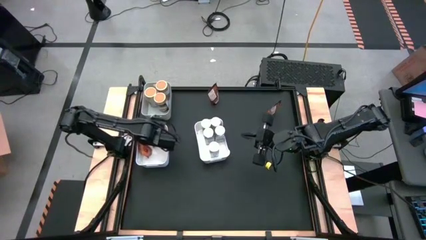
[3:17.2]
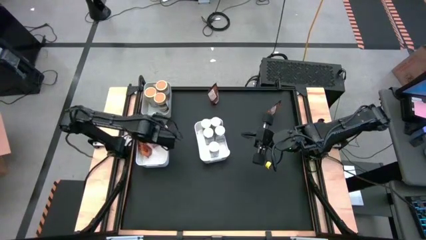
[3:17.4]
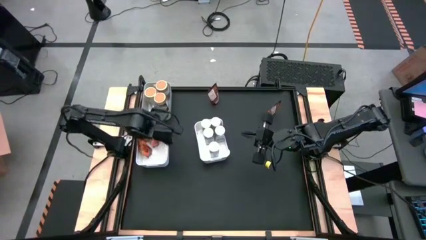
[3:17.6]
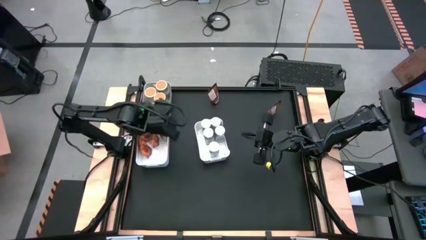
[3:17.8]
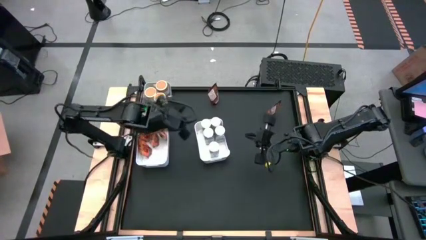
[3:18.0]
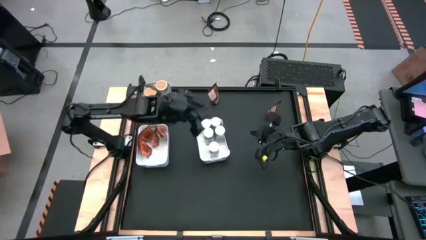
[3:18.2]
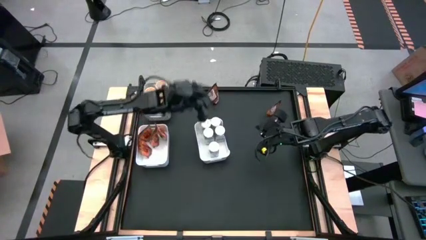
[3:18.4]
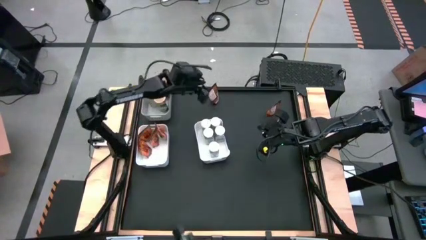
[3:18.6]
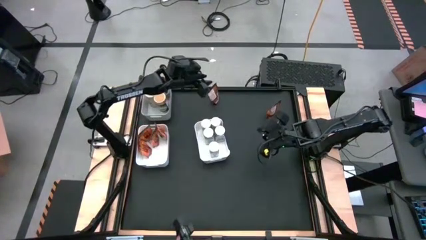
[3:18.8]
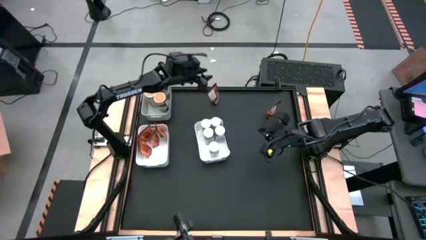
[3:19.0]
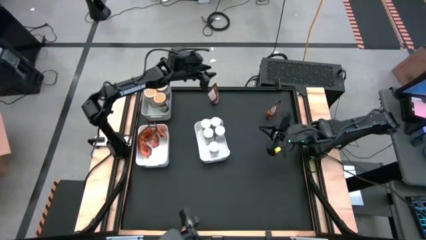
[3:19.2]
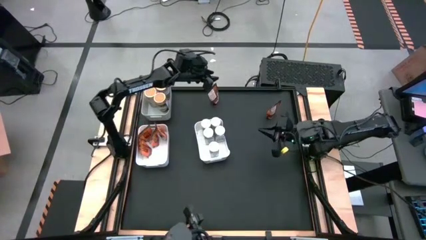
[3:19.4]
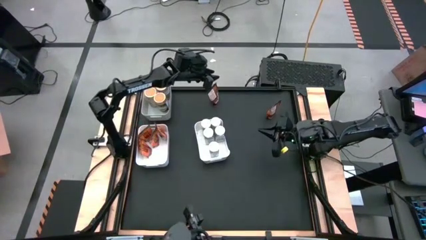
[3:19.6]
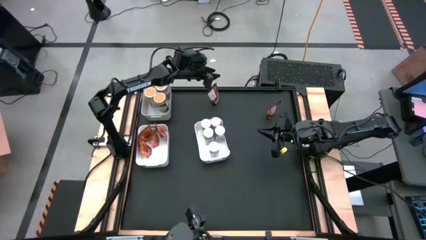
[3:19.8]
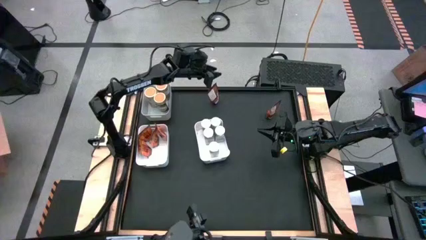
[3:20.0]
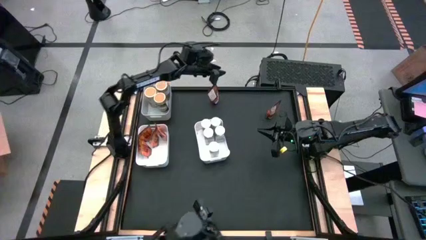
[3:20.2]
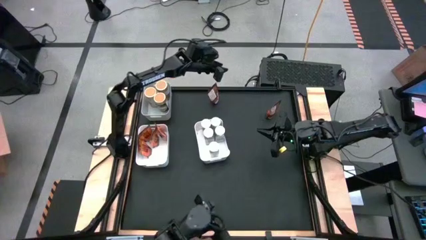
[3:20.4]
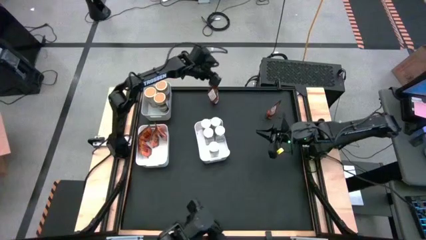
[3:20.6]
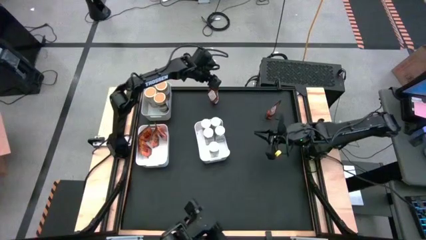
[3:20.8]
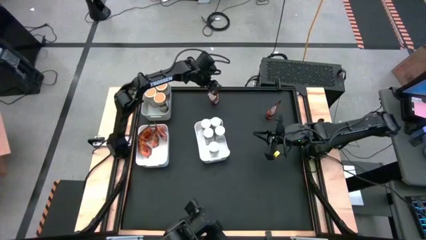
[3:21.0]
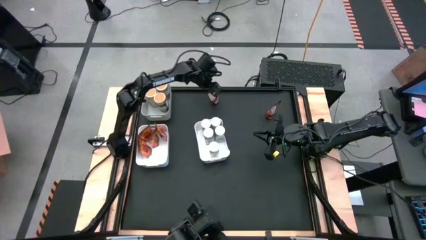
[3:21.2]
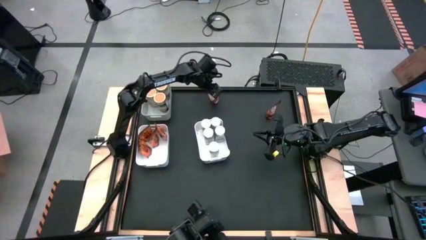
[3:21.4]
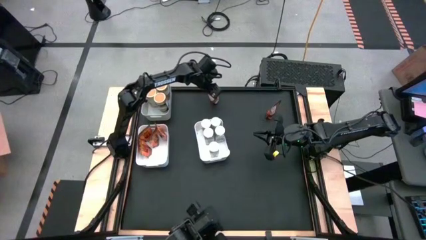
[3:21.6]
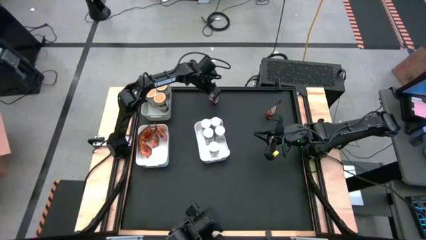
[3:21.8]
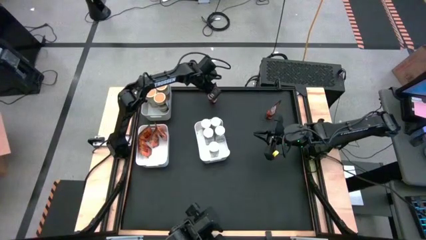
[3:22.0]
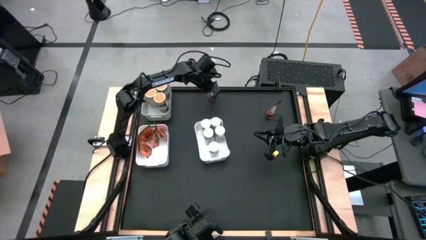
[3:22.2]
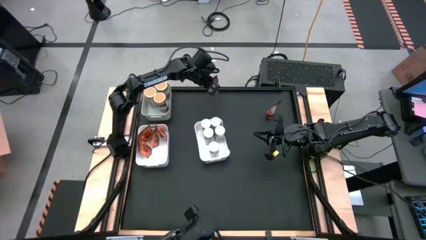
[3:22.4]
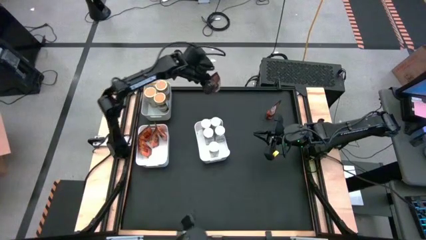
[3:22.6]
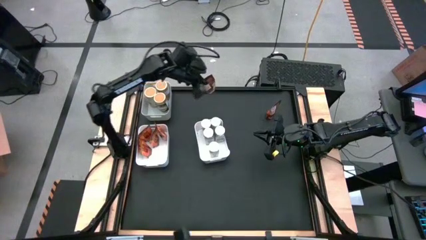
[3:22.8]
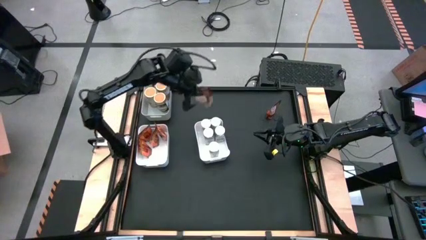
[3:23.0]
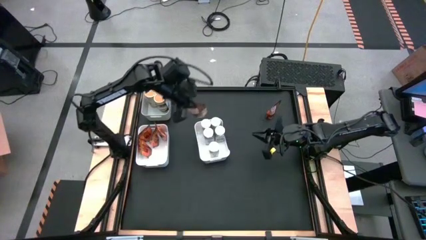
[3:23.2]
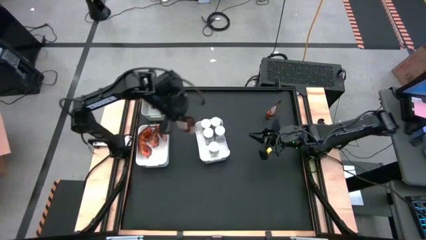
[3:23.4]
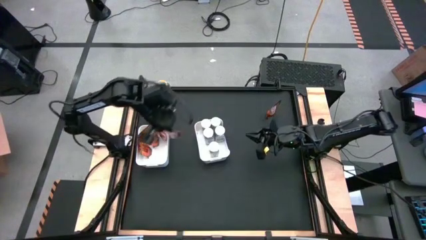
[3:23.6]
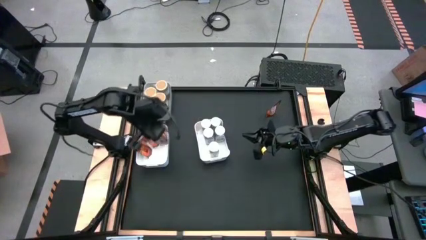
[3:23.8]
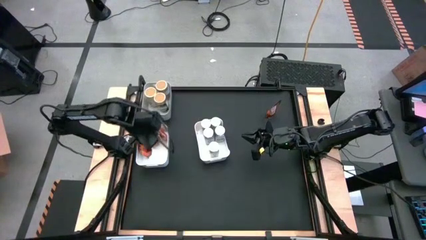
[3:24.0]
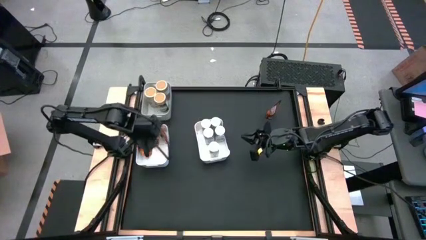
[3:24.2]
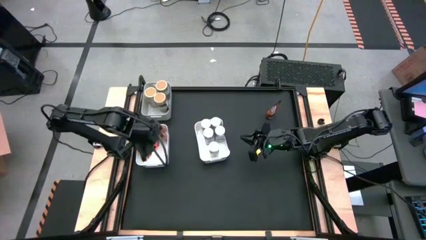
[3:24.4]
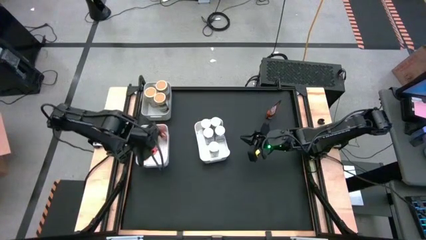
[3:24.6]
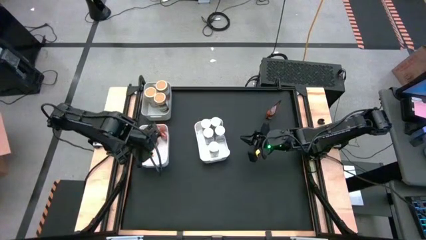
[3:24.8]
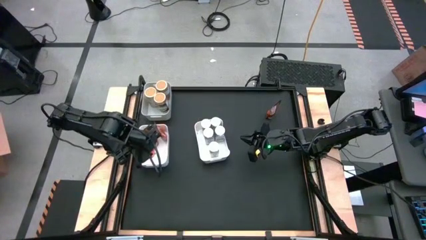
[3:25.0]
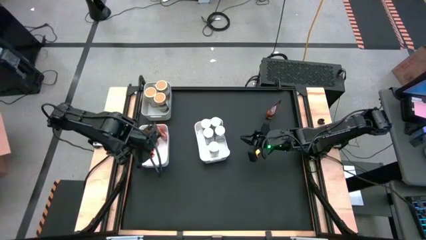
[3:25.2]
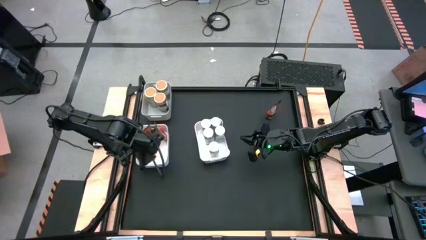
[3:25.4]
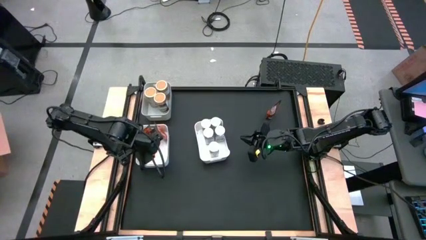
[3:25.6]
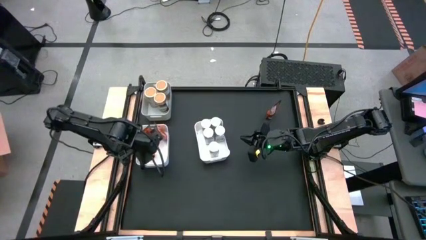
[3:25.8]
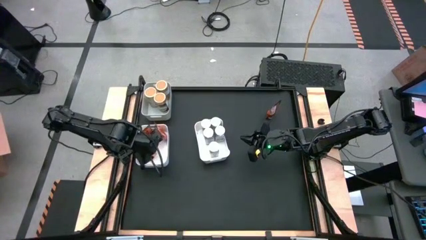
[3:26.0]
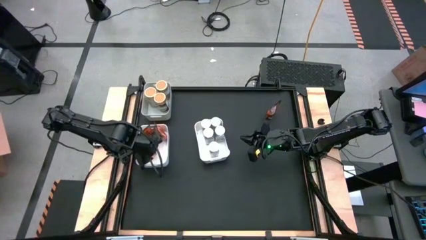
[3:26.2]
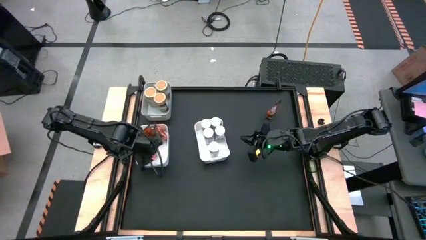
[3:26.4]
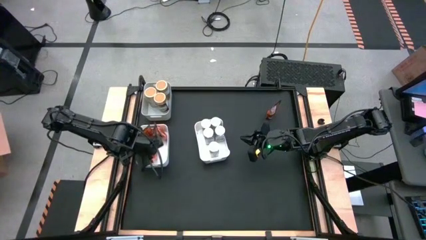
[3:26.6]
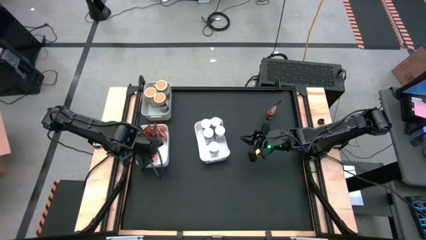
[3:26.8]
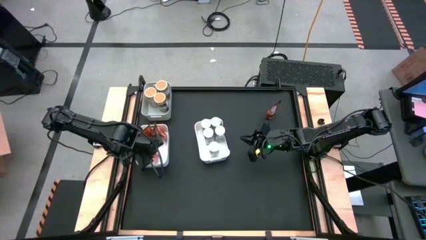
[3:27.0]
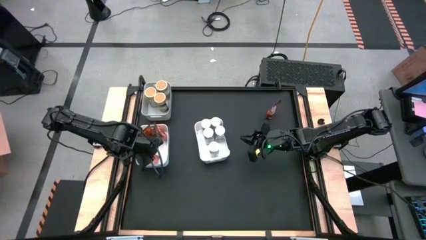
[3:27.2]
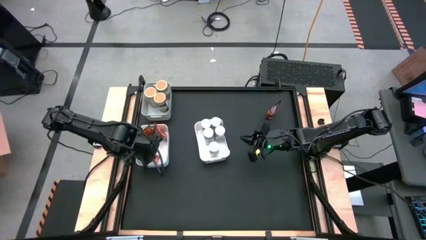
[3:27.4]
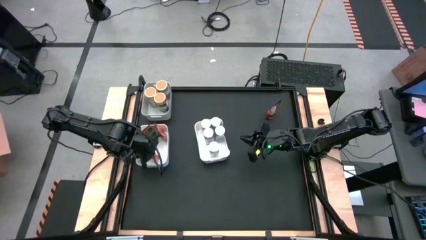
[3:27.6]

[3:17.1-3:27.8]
Task: Sort spices by type
Put the orange seasoning pack into the left white bin
